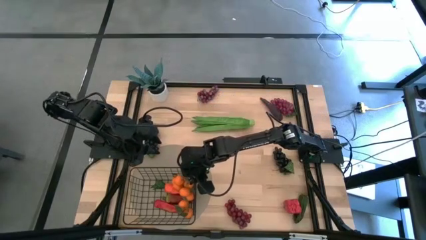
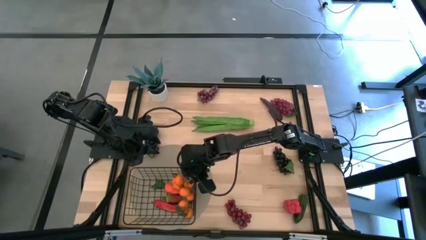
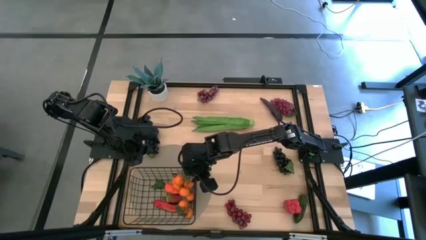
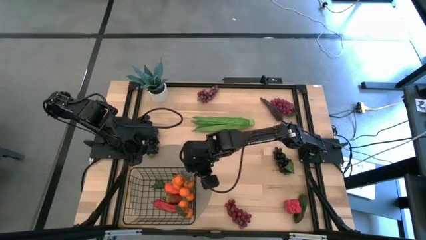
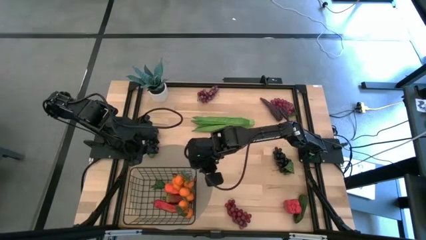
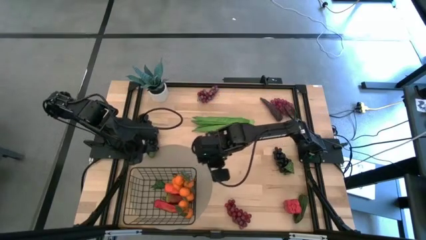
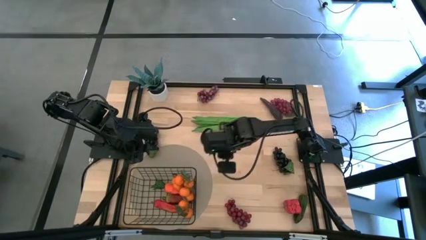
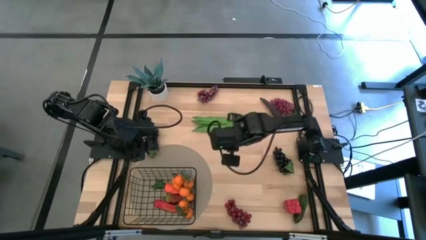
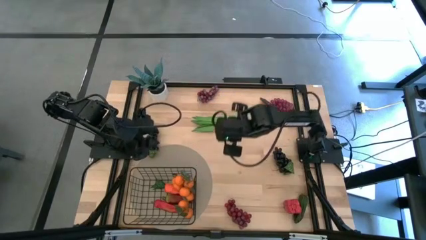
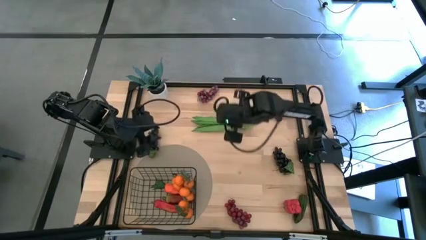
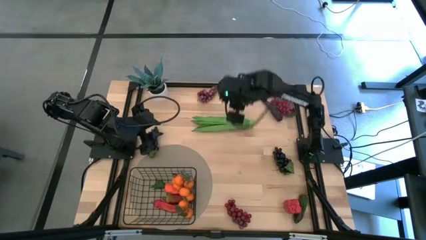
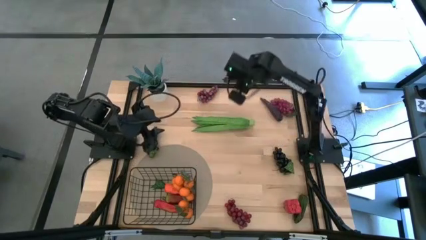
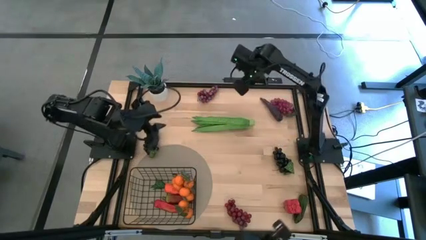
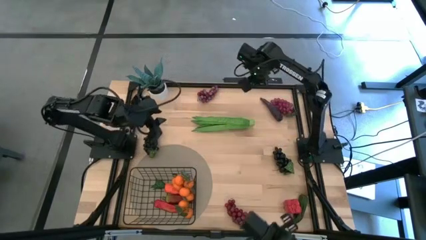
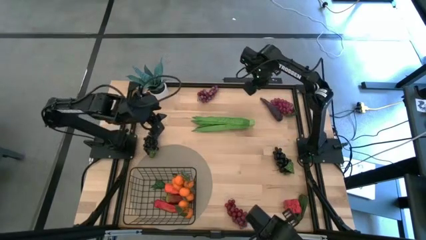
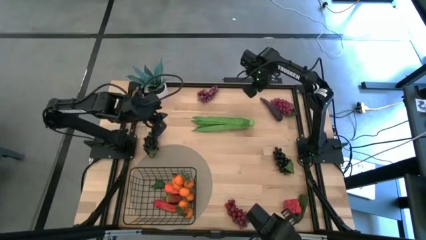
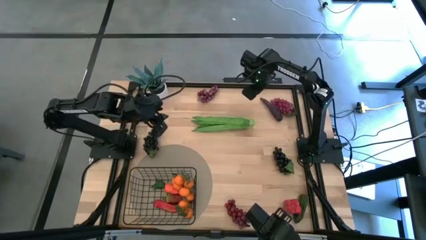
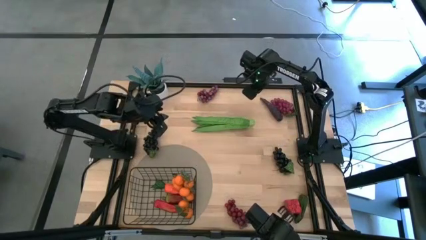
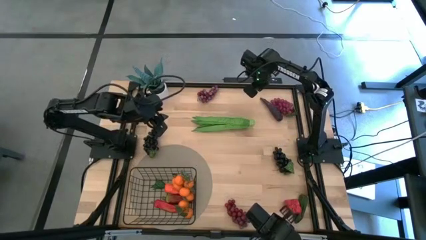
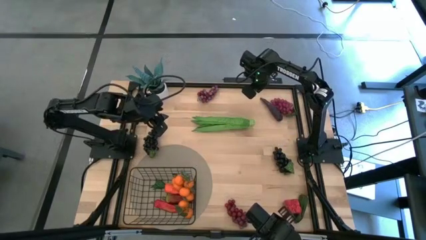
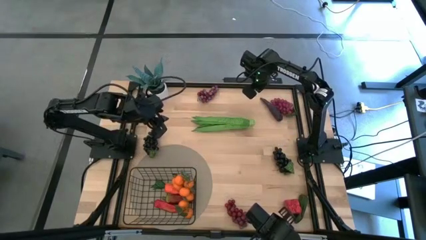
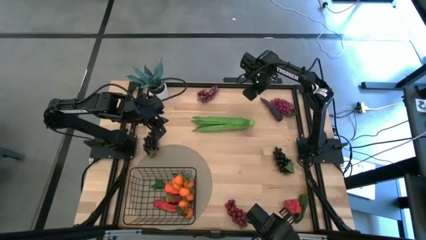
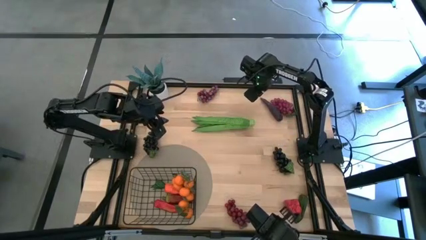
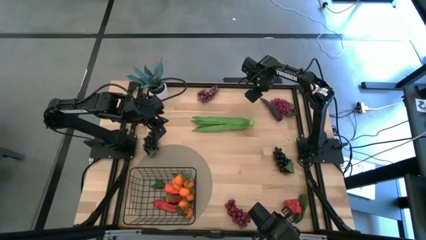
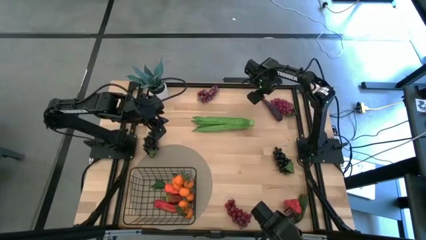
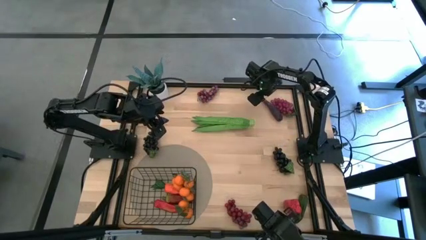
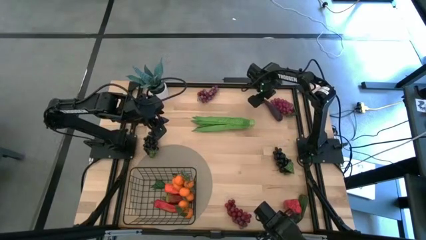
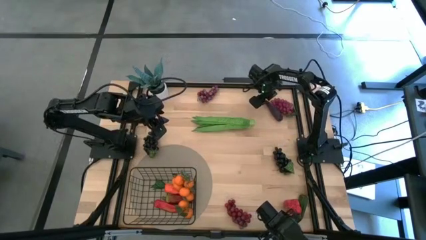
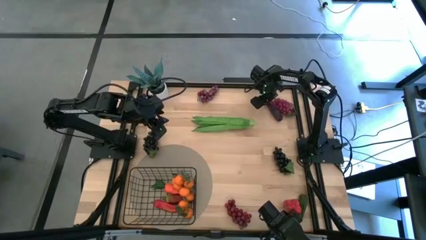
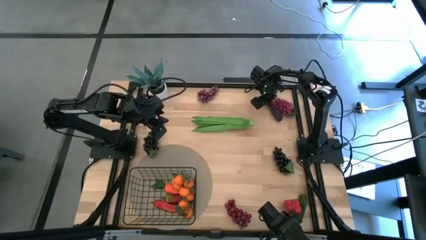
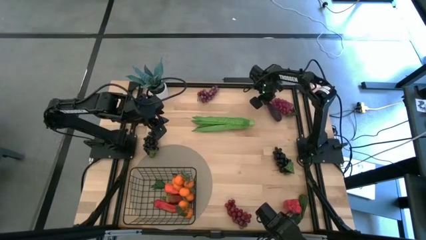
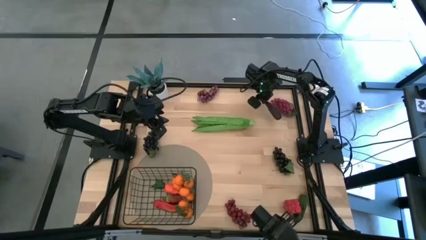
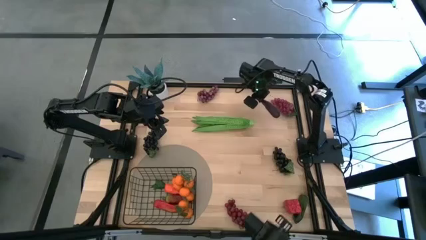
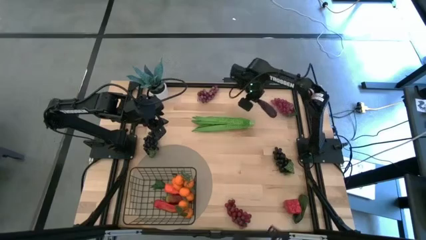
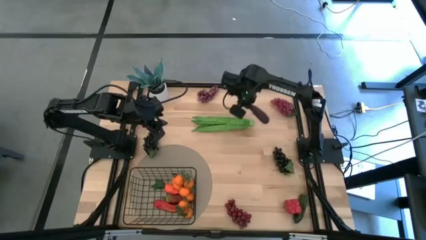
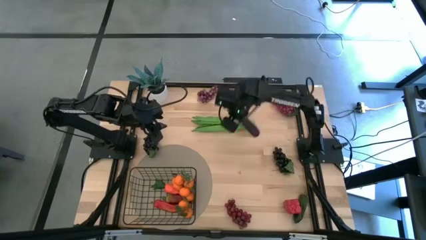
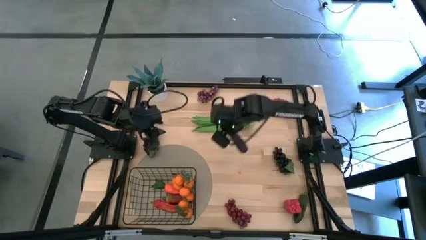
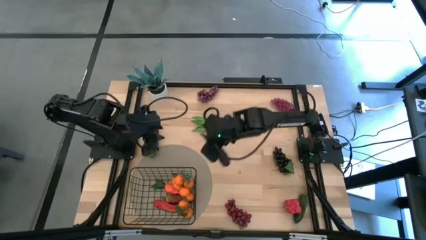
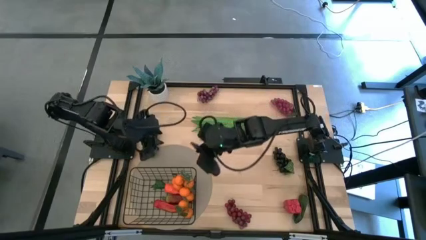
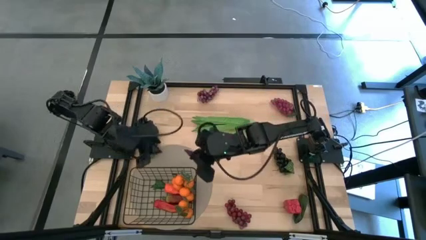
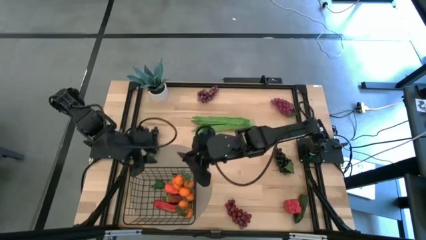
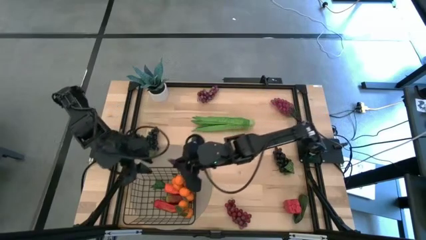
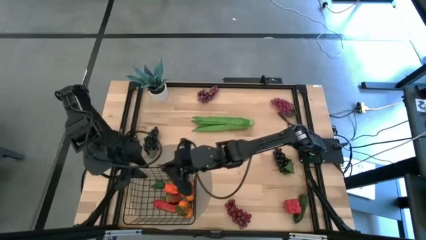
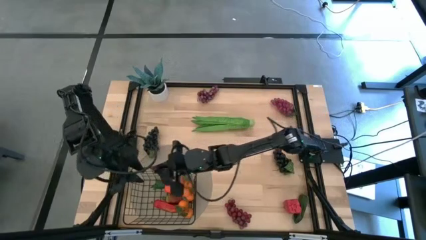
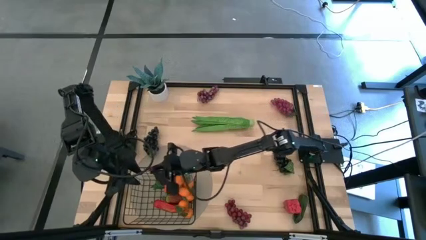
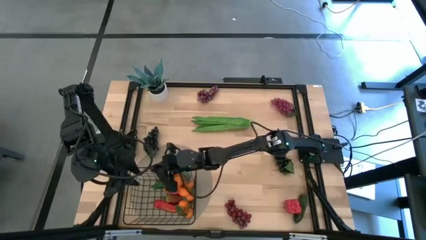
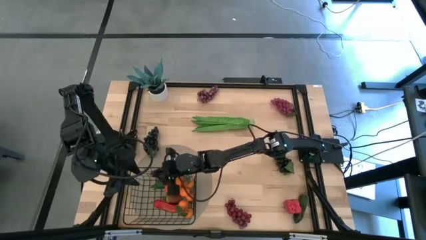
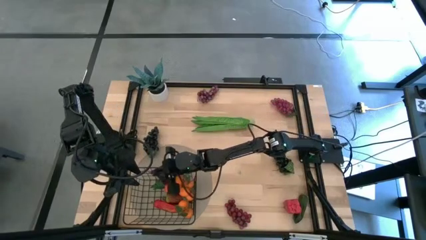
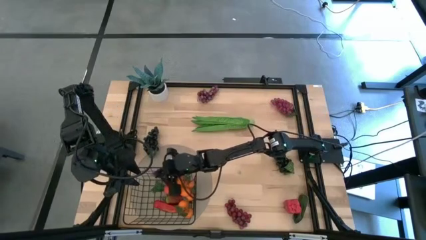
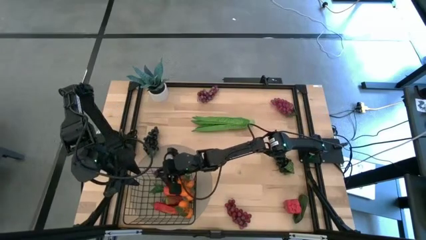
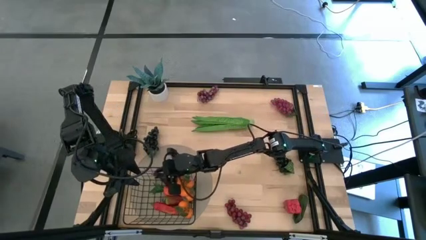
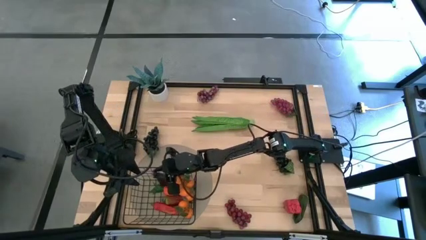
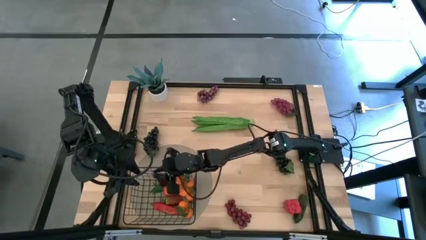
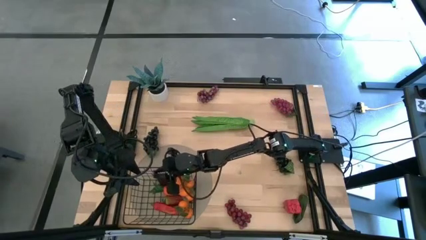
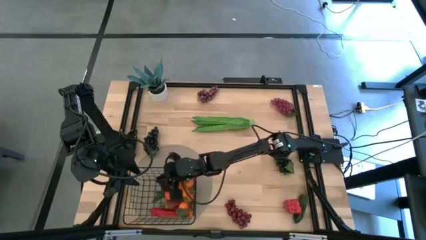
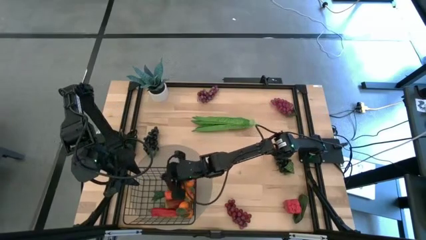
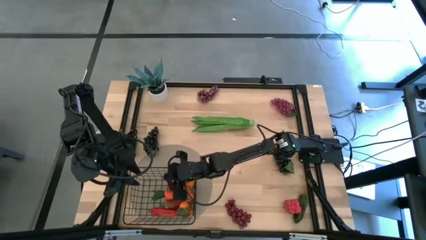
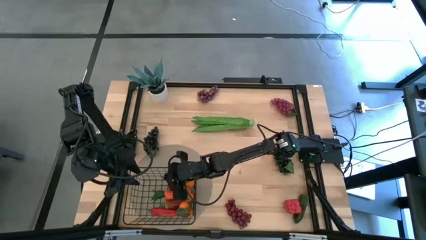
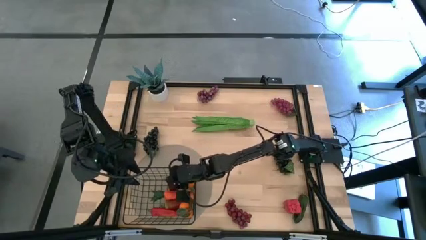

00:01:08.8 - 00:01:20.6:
Task: Build produce basket
Put the eggplant into the wire basket

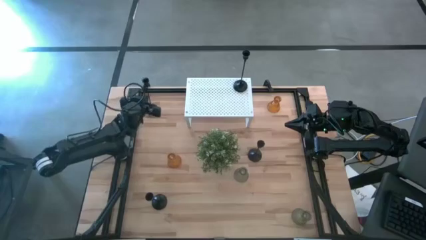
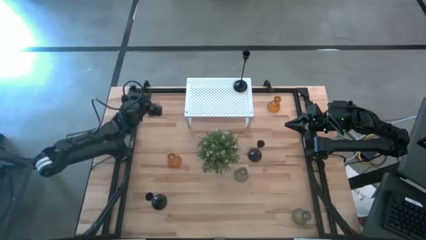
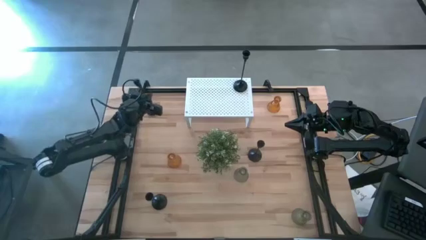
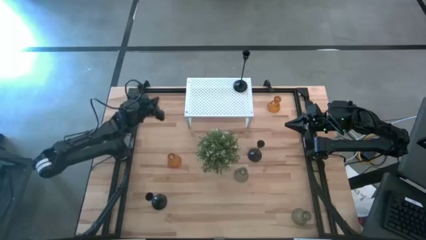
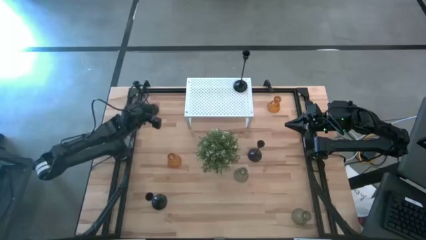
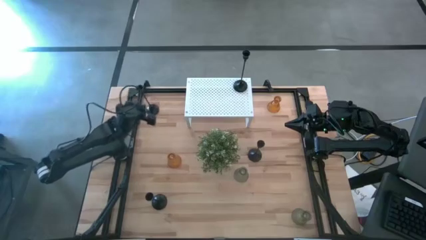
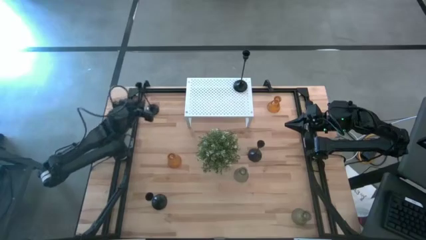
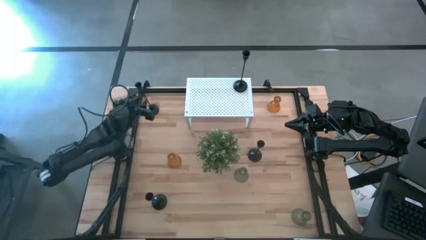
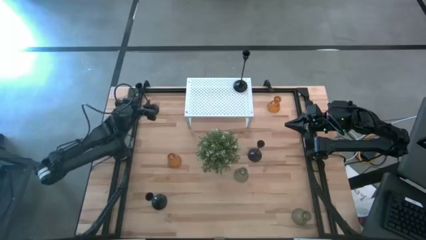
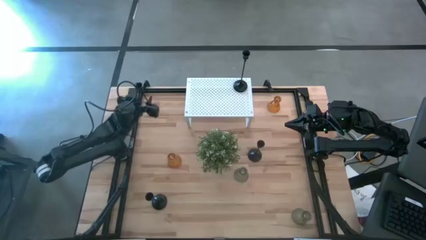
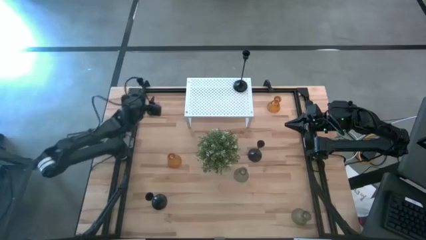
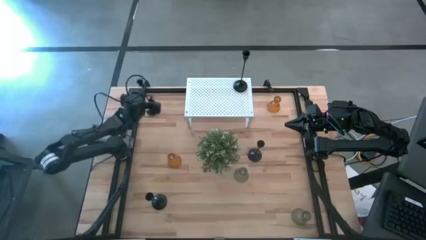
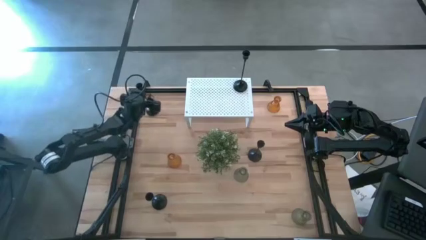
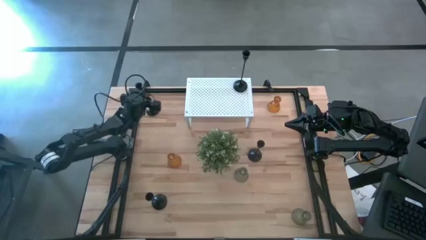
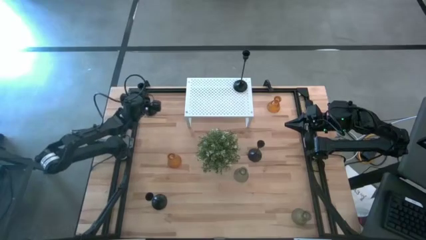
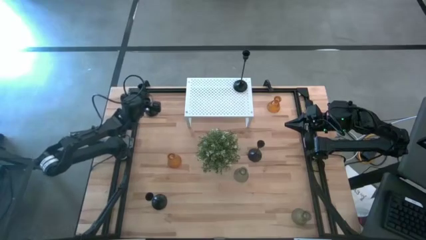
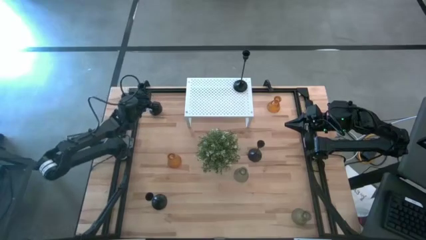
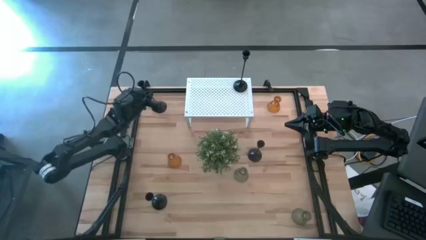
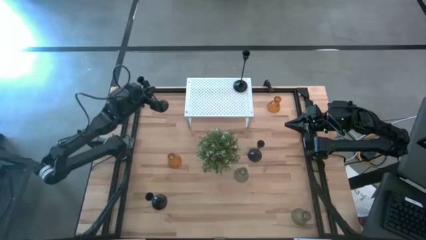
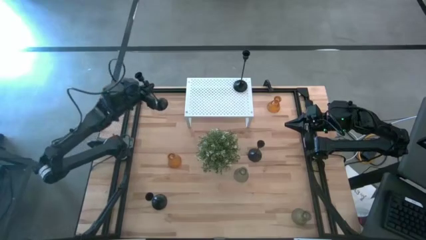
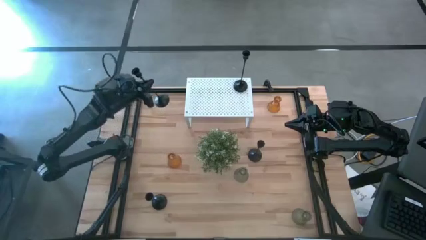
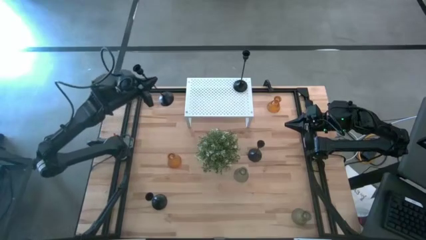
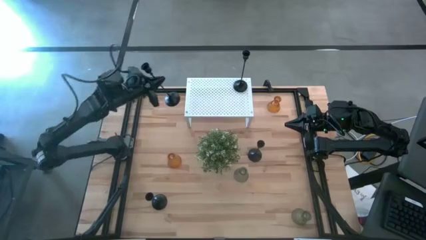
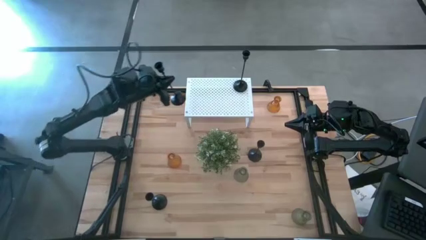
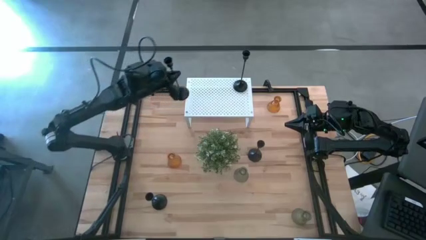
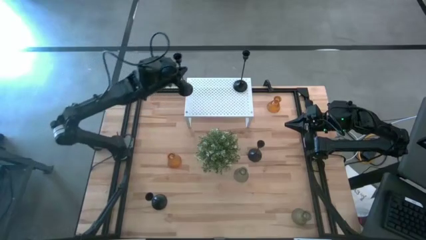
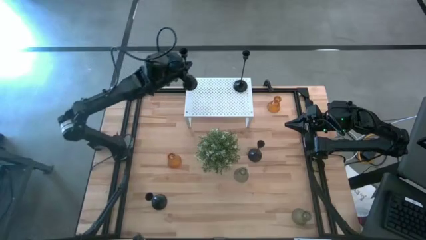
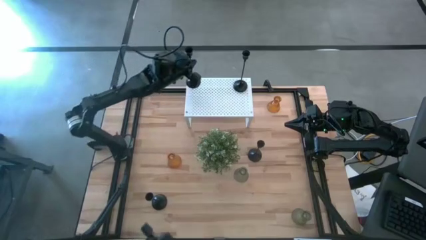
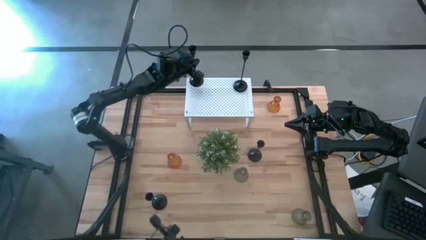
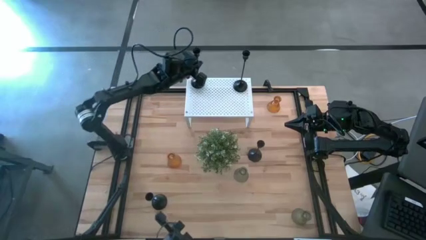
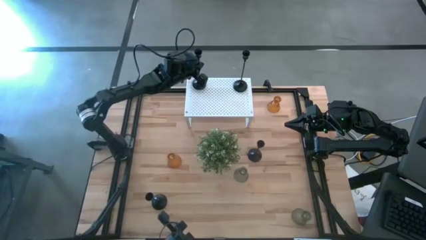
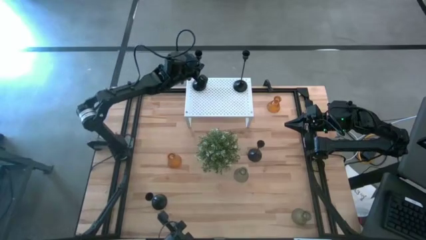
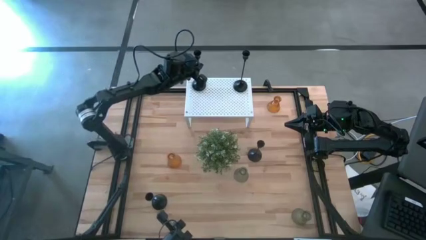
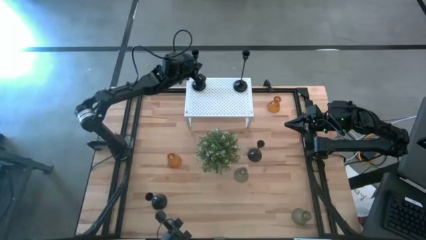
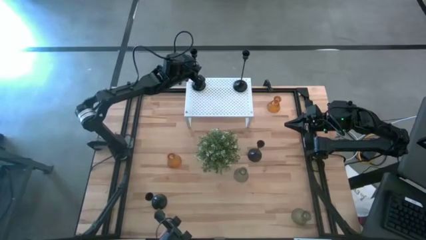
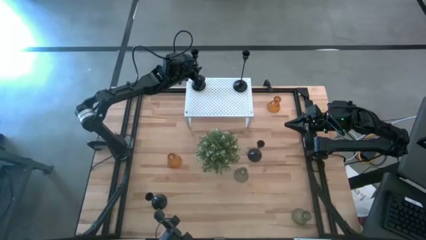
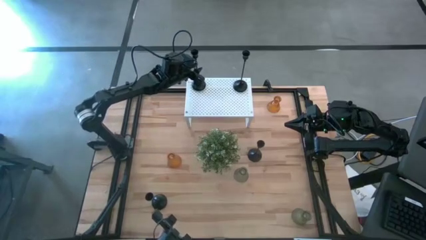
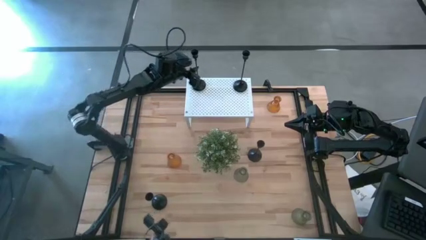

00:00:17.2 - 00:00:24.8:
Task: Pick & Place candle stick holders
Put the top left black candle holder on the shelf
